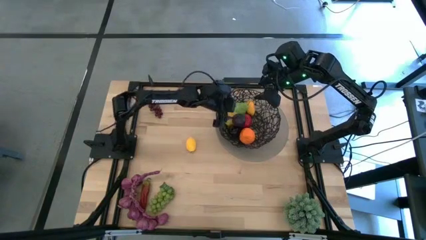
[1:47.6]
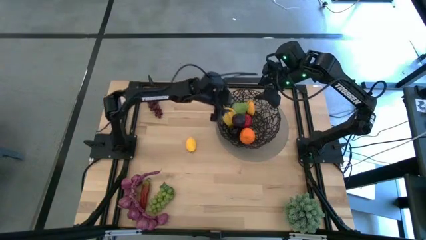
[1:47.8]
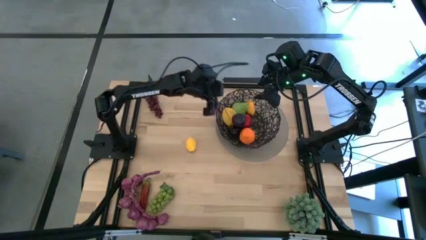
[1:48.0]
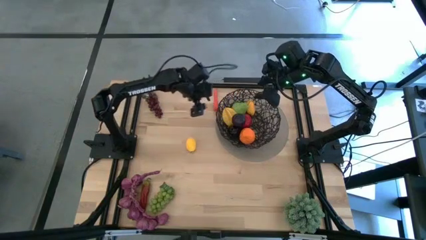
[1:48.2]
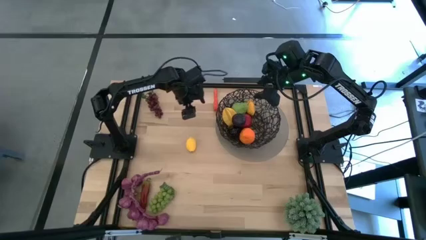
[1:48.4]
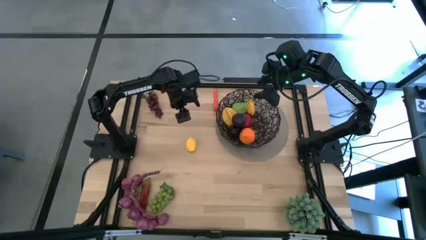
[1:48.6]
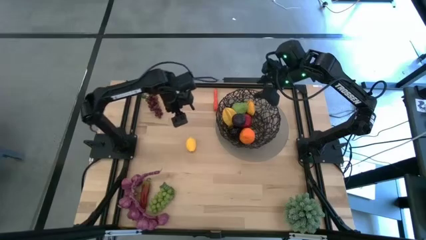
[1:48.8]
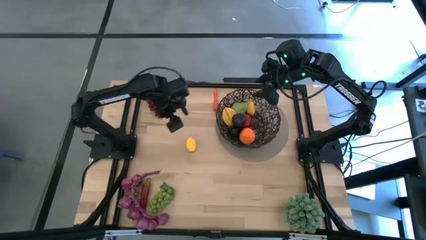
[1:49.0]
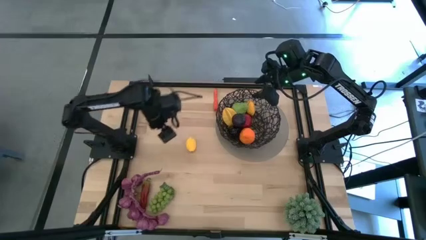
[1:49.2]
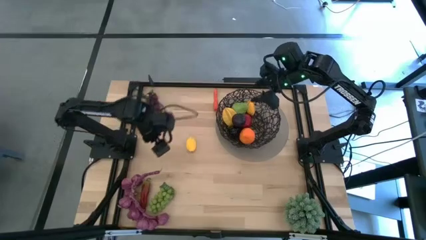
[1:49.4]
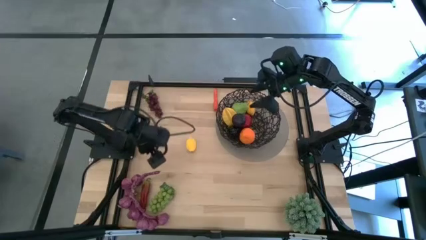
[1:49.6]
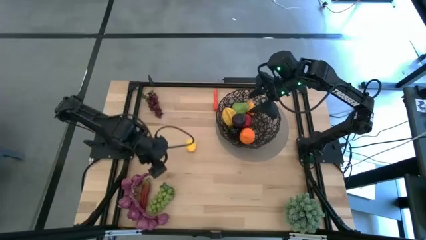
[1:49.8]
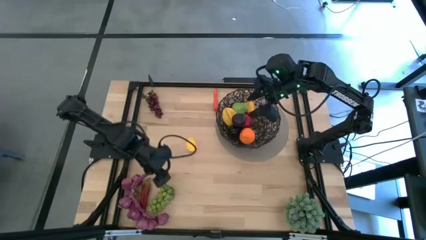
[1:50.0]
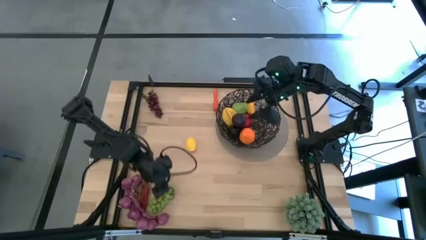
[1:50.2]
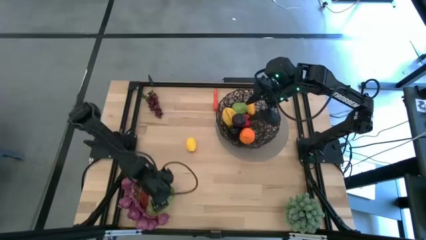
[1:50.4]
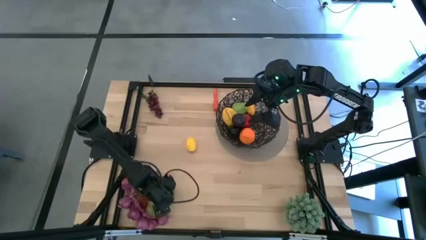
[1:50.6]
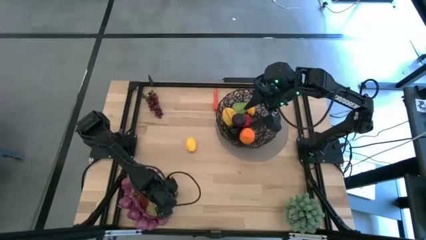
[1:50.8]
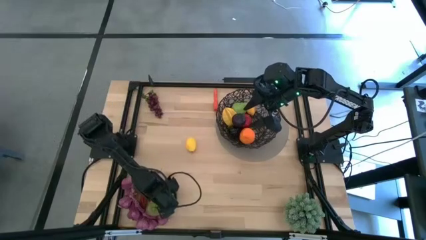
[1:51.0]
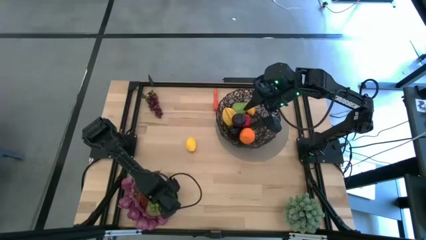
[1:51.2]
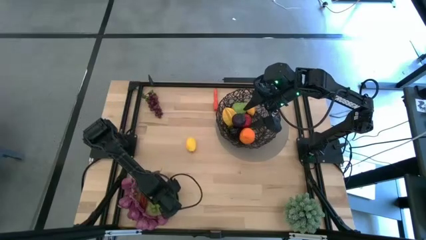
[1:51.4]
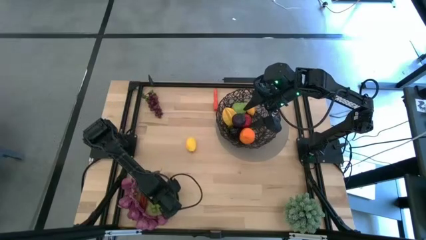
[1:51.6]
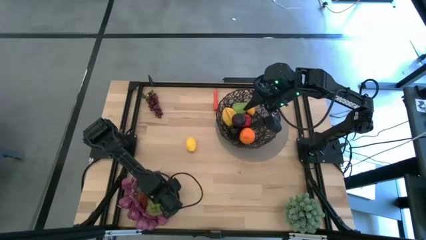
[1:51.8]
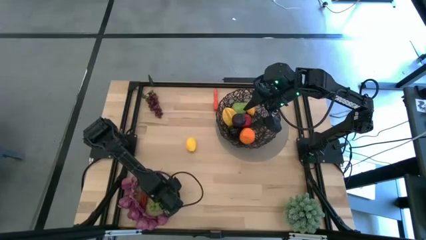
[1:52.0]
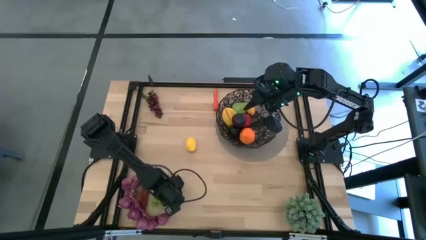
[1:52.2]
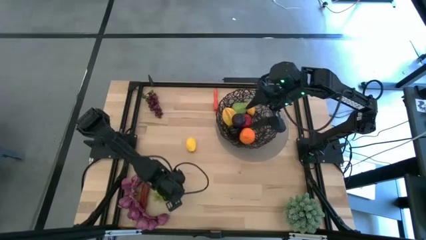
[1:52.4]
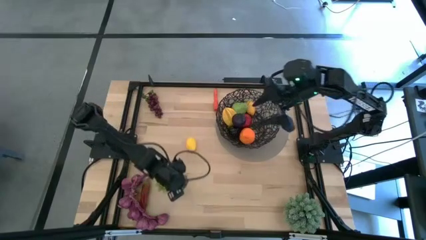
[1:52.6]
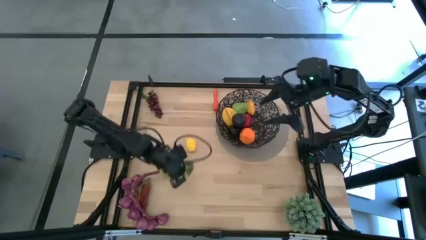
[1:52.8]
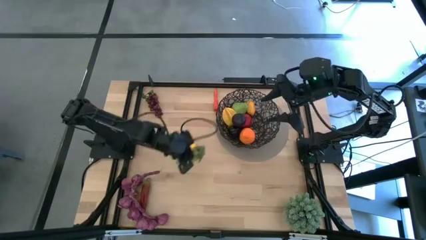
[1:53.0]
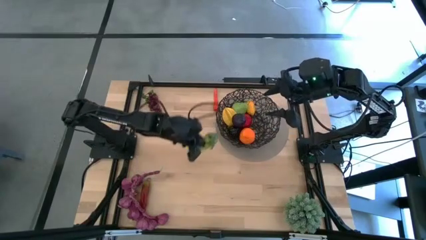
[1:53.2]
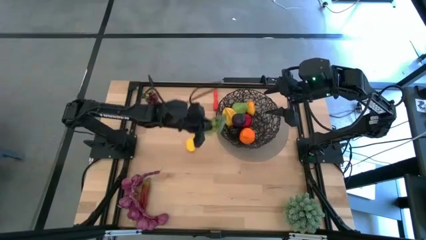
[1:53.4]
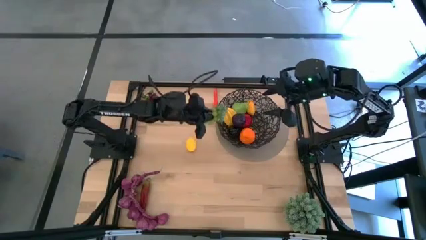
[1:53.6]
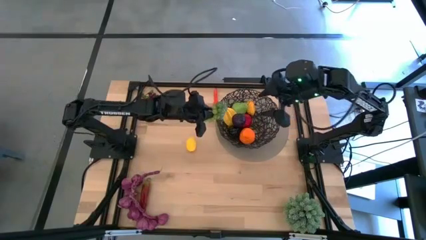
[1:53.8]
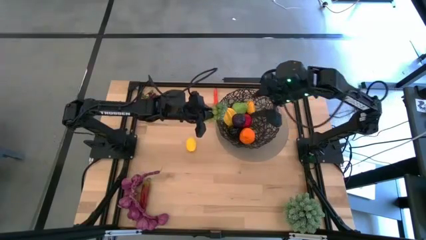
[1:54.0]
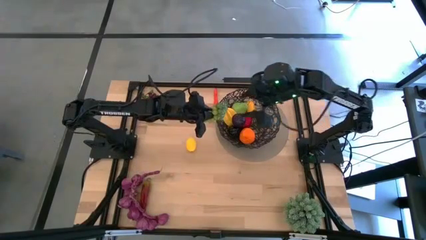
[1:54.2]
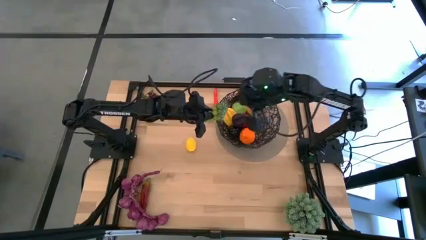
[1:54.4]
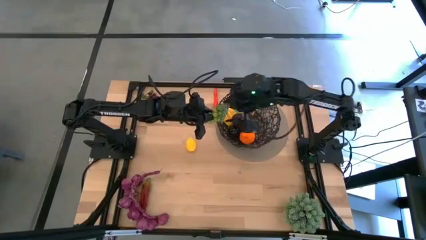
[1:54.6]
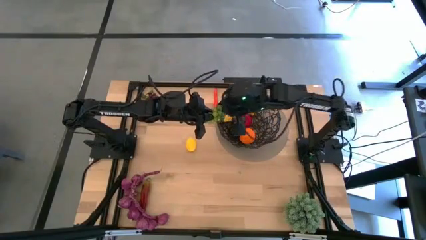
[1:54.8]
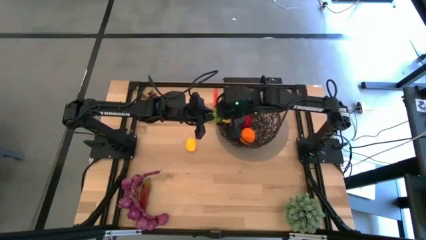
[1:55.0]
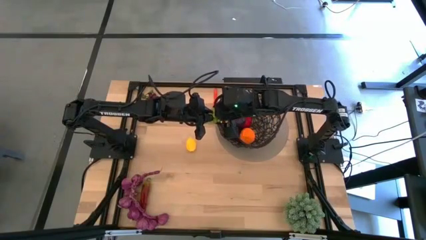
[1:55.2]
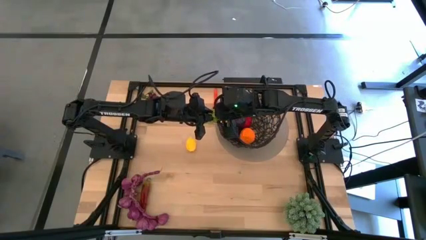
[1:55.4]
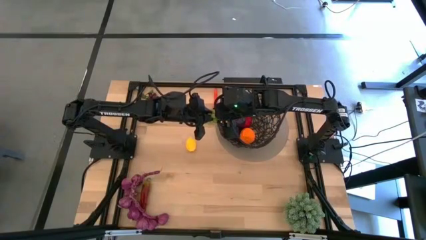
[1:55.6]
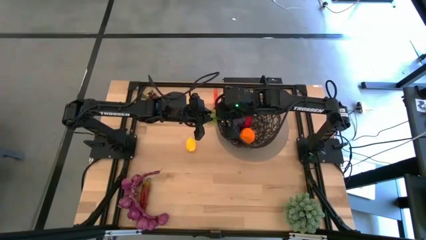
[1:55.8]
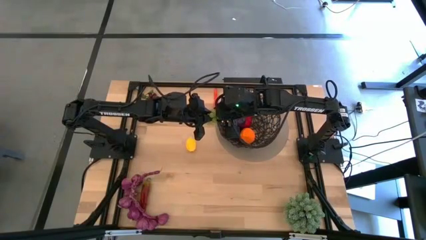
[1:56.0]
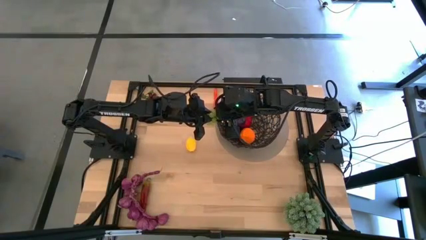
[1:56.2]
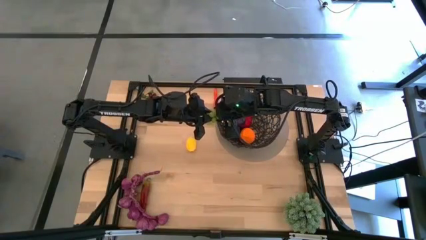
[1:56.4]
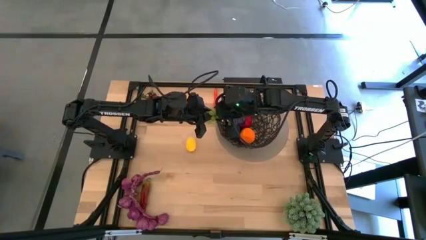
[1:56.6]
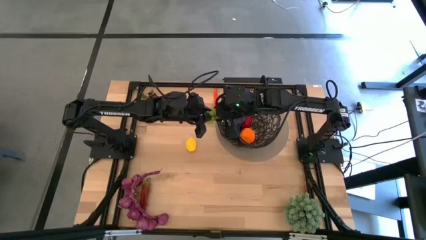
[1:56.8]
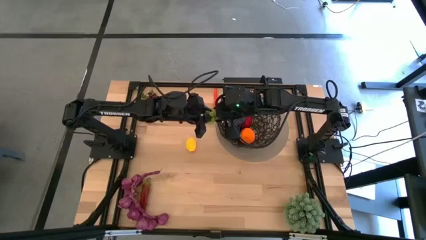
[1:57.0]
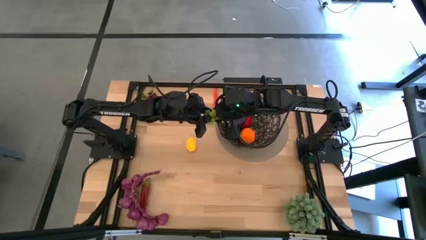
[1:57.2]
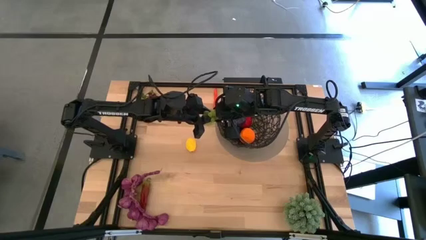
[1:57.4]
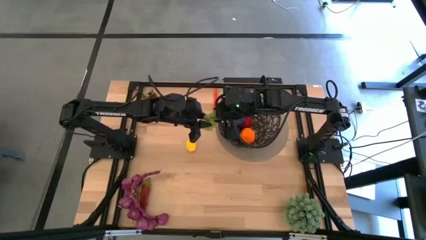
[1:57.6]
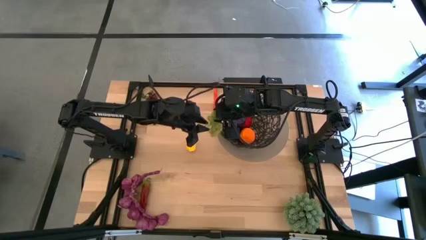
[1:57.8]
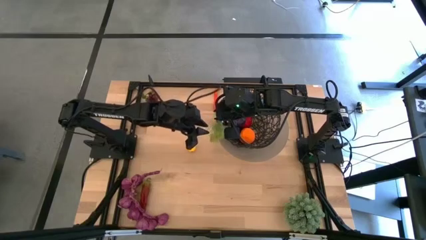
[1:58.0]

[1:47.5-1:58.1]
Task: Build produce basket
Put the green grapes into the black wire basket

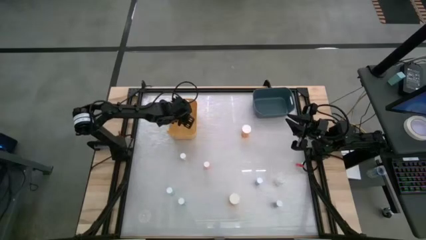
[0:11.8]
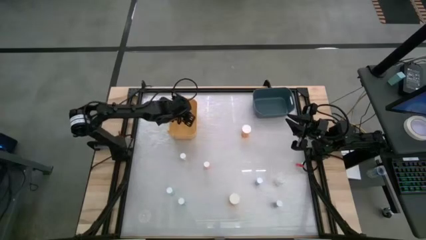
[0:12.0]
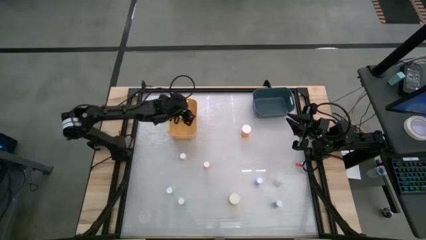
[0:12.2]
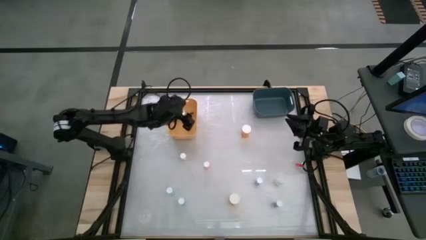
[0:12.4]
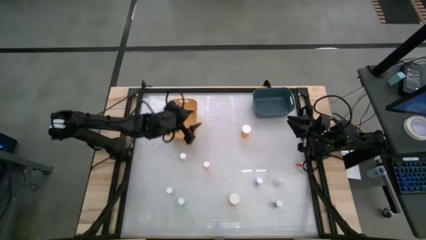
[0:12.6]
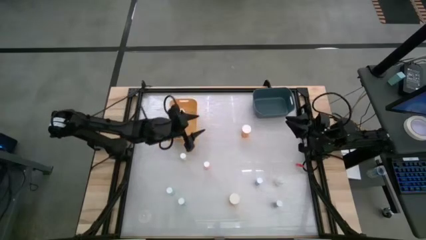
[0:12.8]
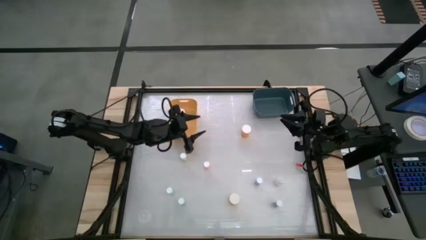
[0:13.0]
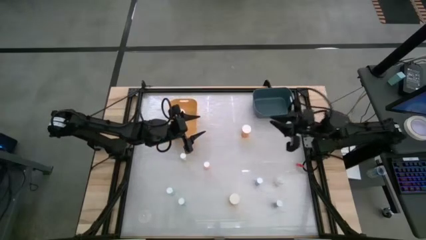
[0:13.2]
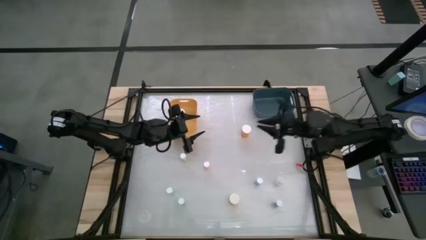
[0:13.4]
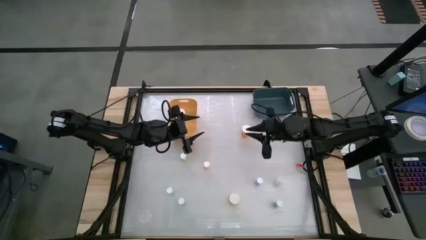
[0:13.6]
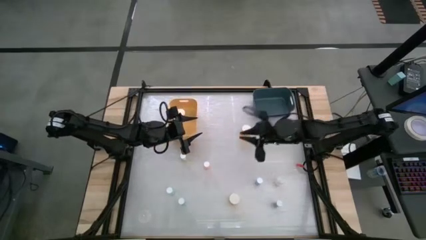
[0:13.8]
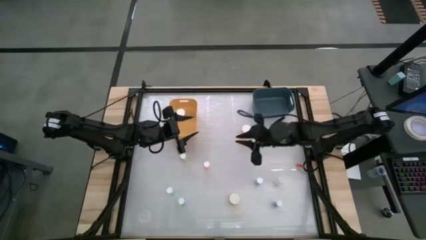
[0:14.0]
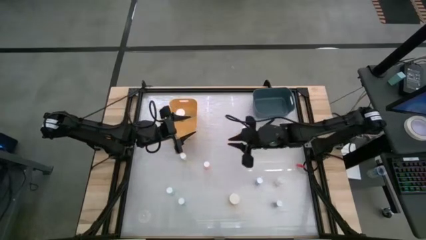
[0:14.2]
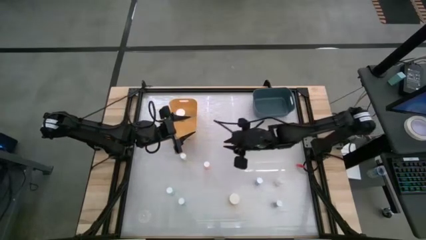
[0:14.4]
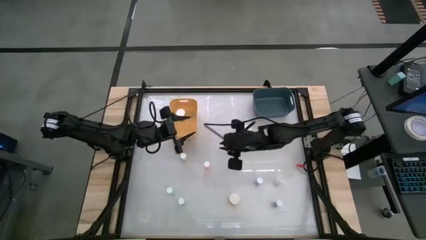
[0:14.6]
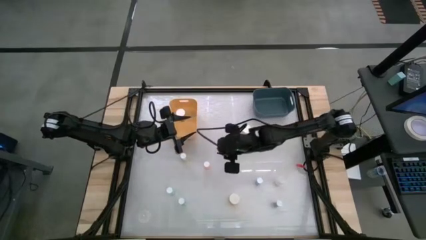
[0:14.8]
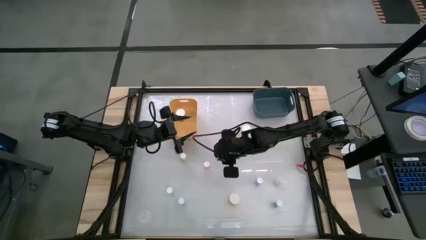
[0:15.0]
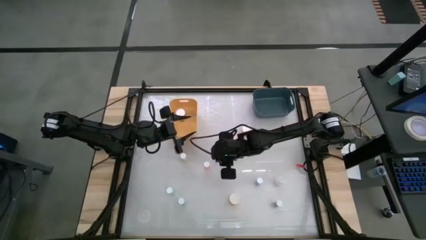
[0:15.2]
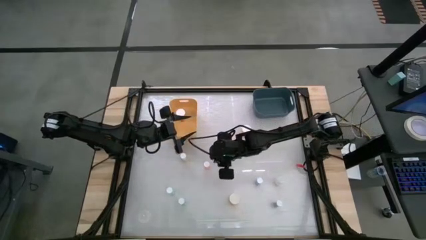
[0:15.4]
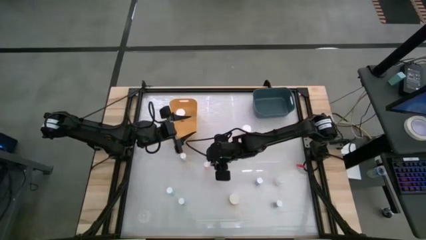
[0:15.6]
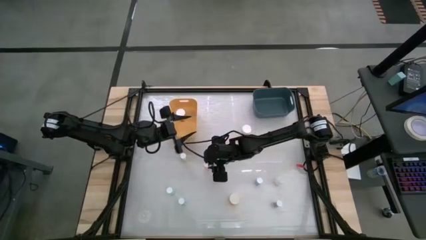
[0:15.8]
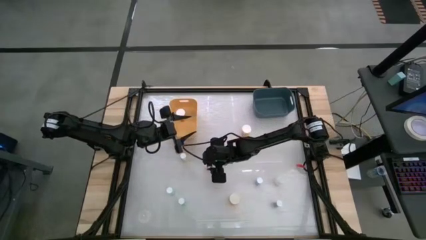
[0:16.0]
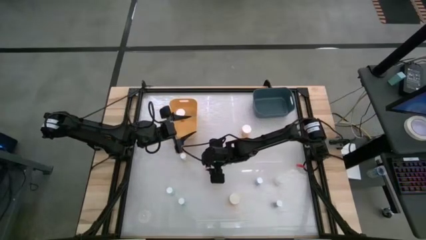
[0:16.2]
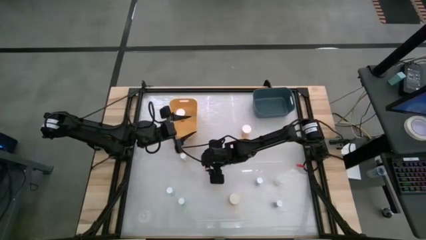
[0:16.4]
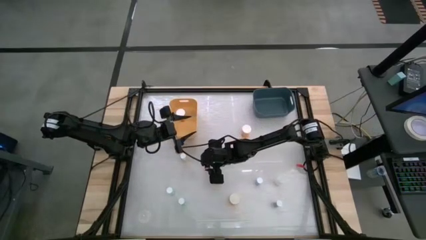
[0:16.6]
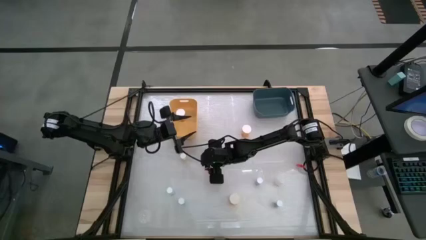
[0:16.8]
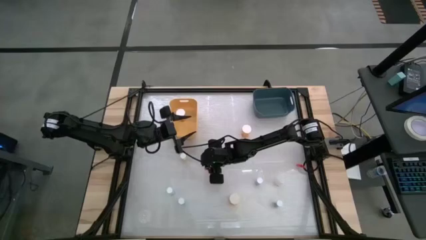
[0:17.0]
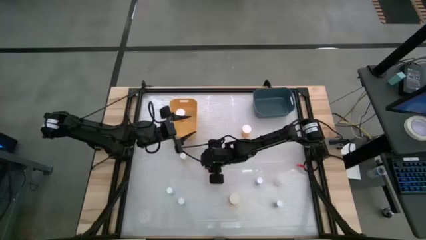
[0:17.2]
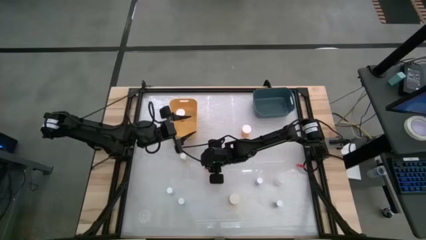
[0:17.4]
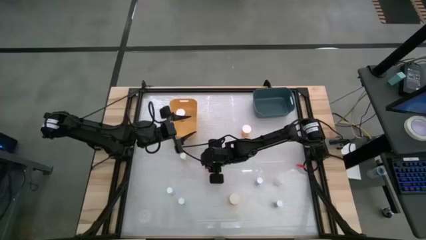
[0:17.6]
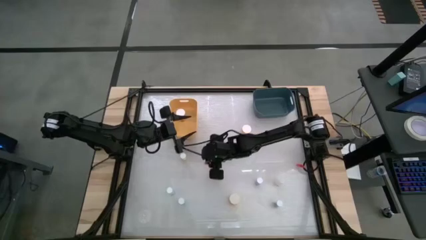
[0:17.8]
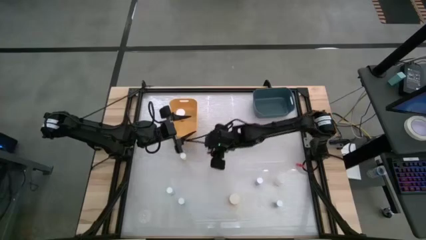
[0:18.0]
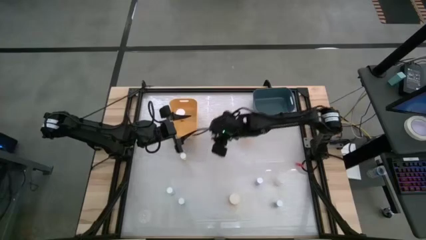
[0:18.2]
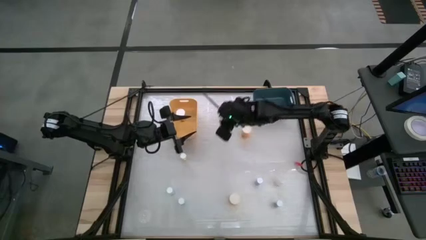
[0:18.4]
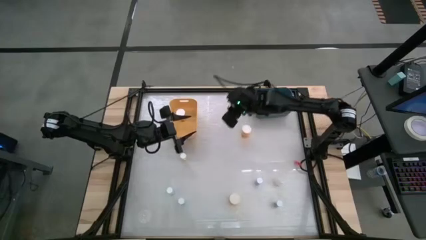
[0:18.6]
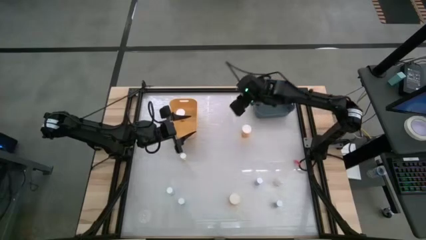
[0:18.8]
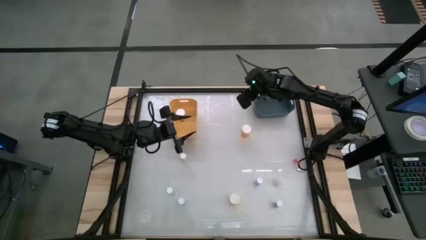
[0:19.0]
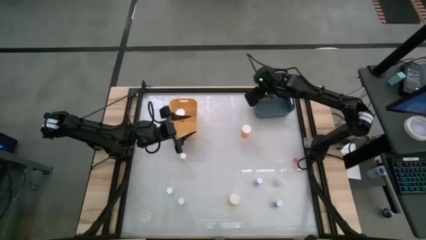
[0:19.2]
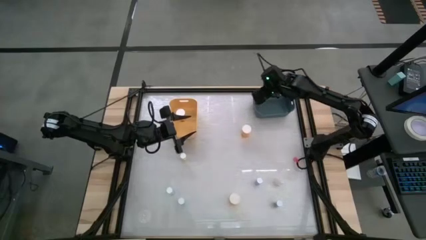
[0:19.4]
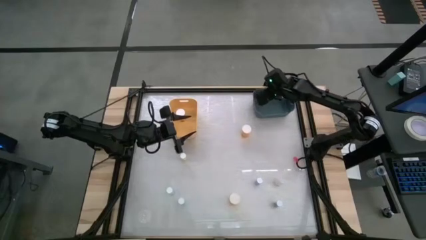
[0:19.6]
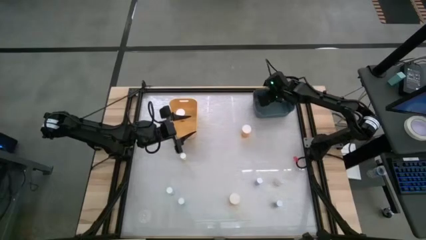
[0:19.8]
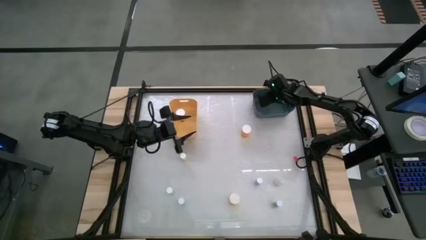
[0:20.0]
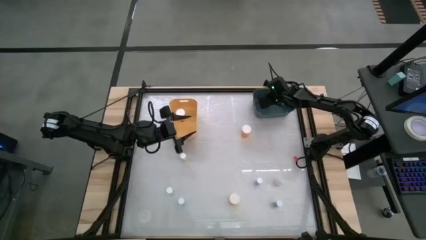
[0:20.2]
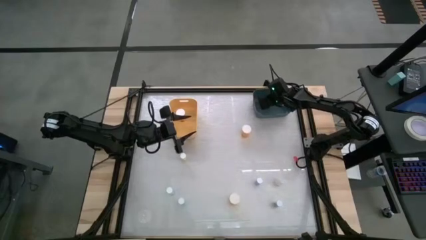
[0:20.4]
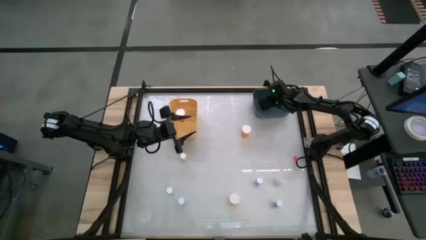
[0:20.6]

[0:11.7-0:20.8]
Task: Pick and place medicine bottles into bin by pill shape (circle, oval)
Put the small red pill bottle into the blue bin
